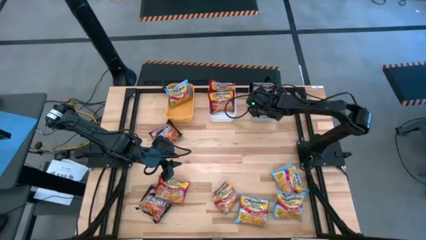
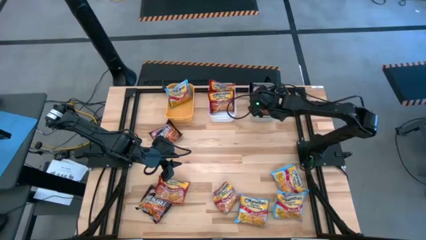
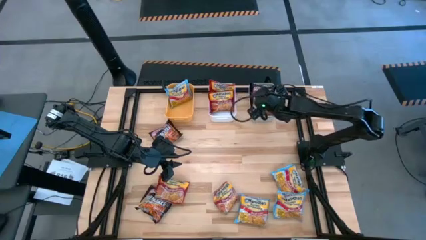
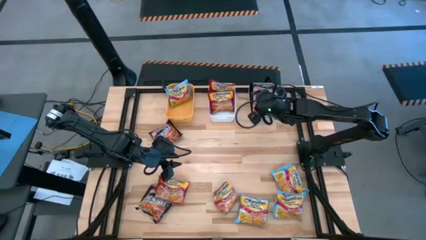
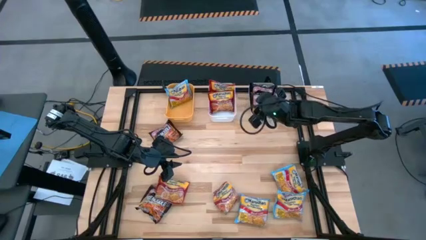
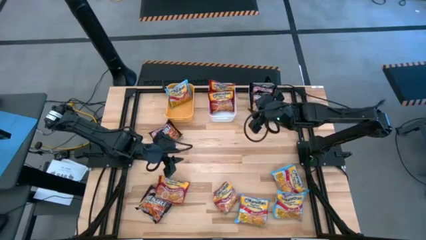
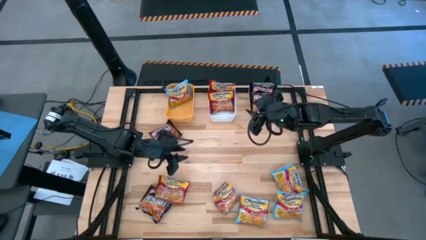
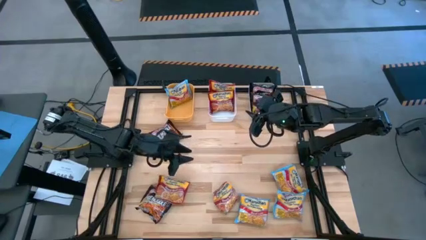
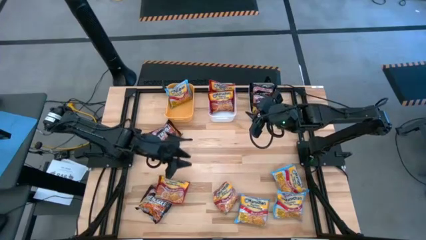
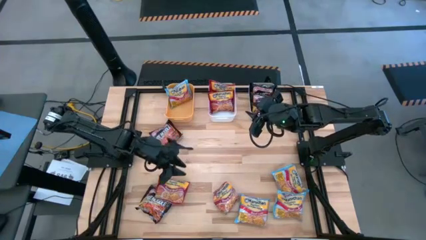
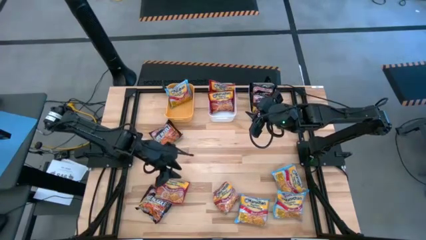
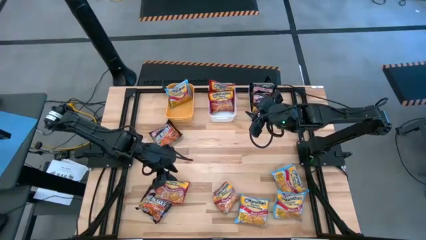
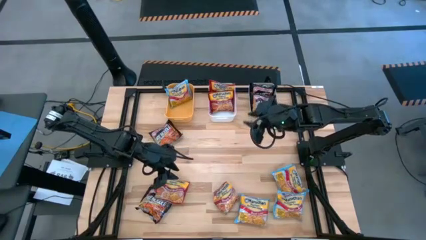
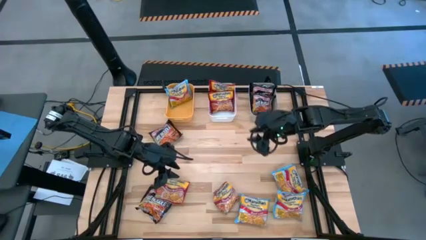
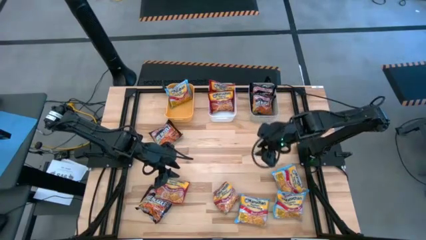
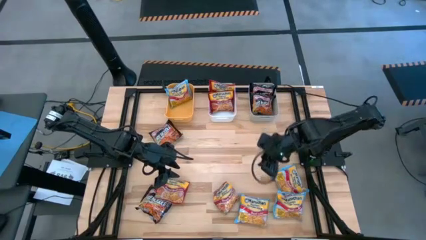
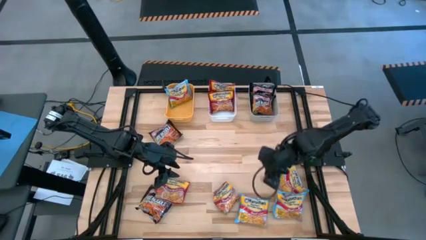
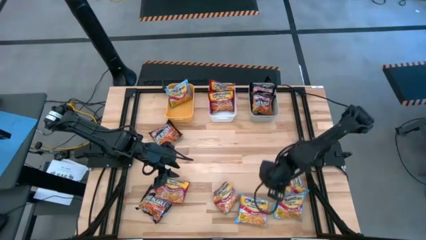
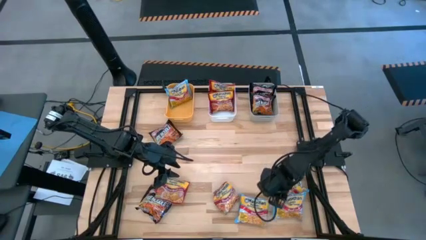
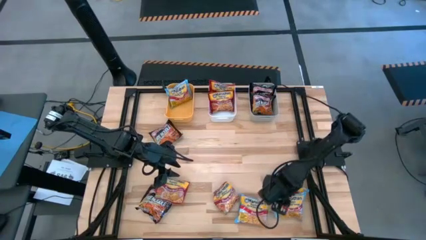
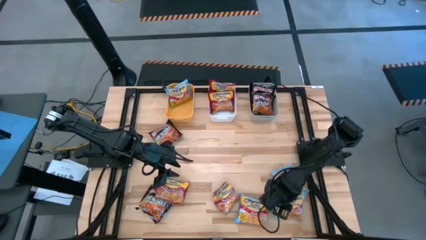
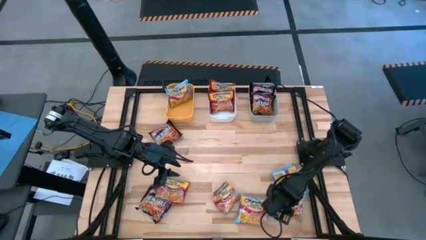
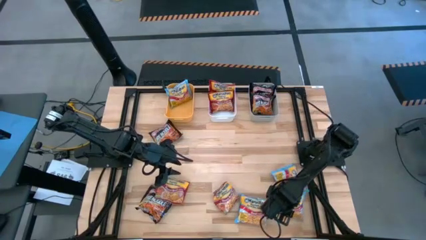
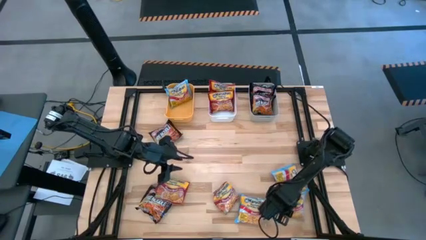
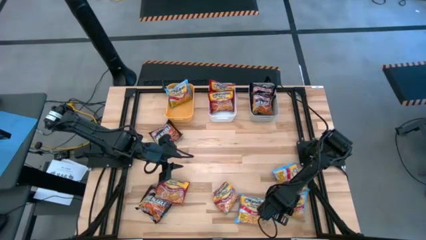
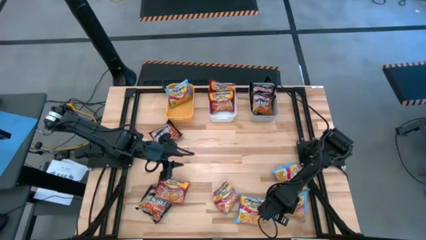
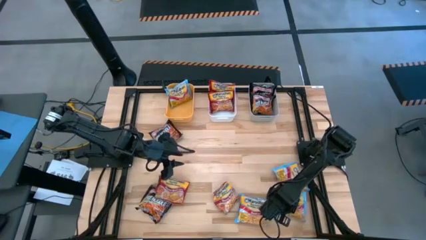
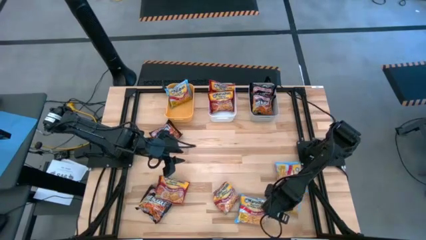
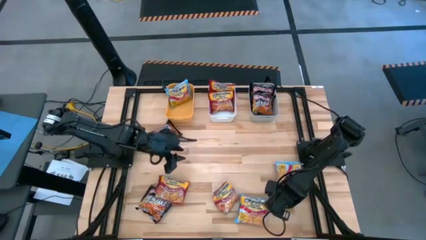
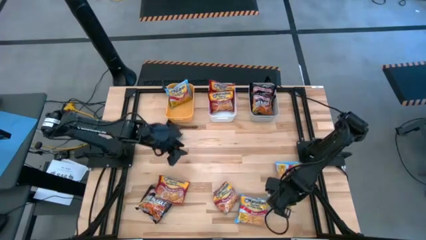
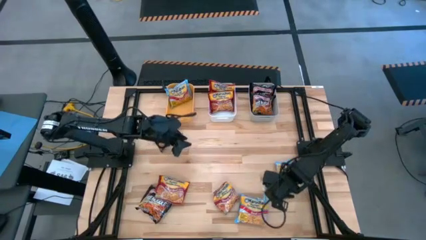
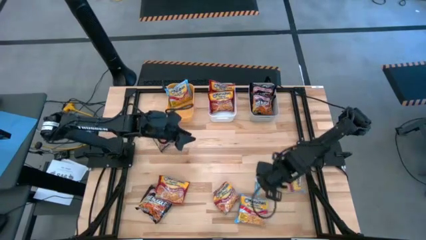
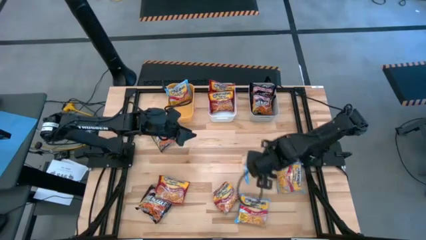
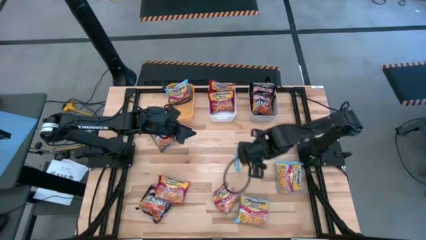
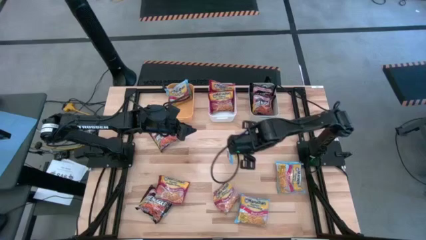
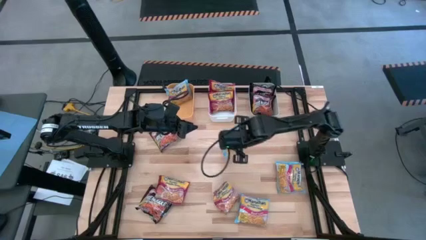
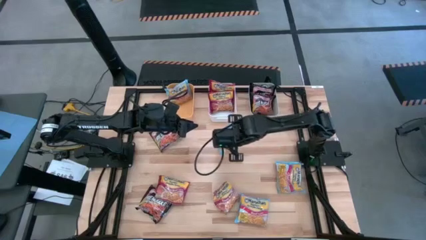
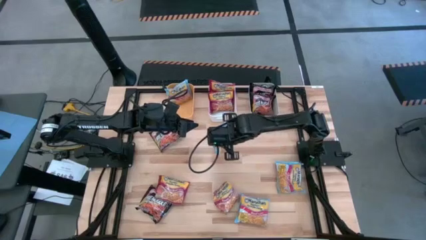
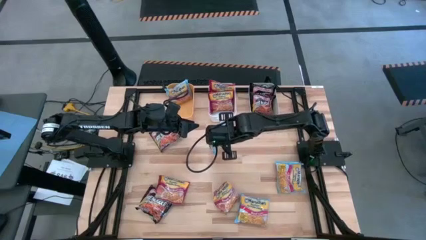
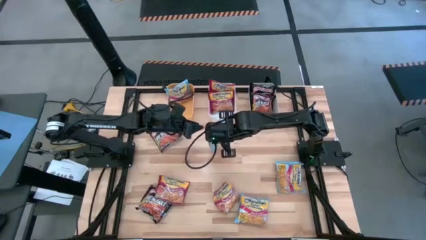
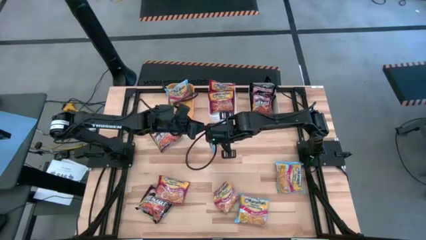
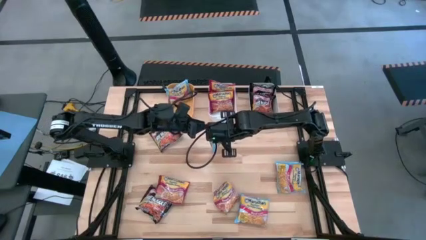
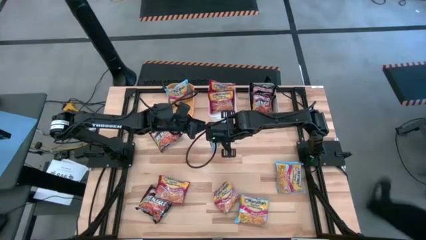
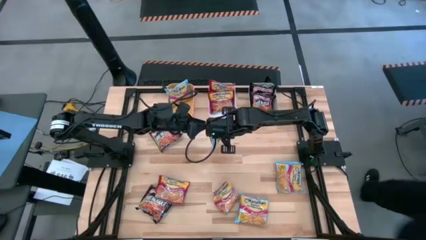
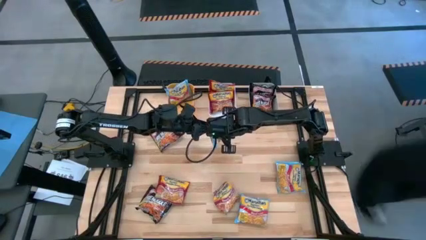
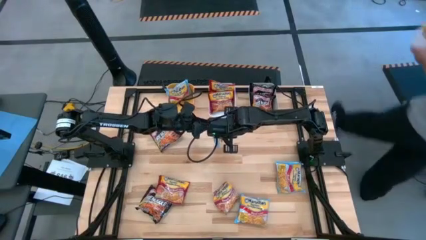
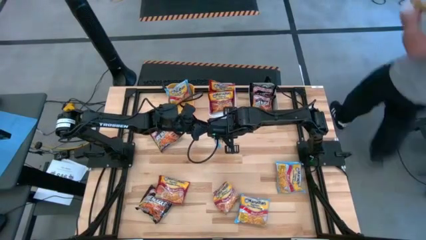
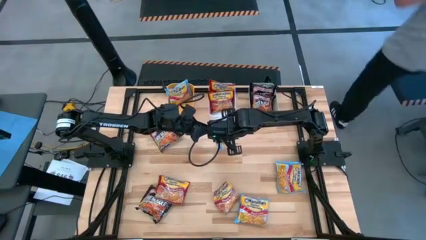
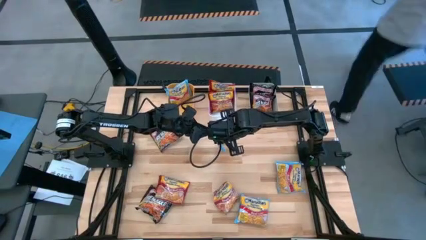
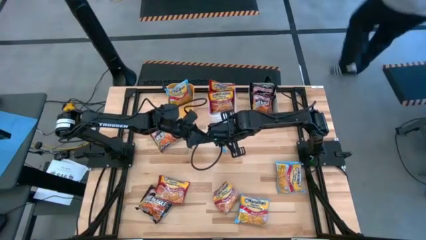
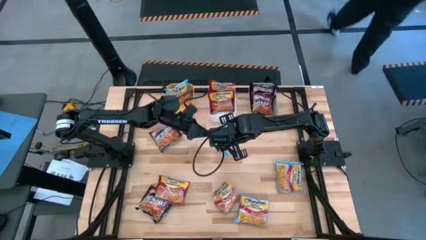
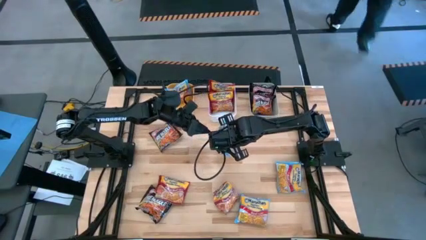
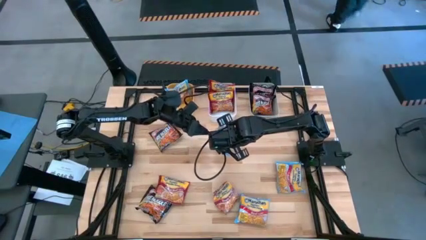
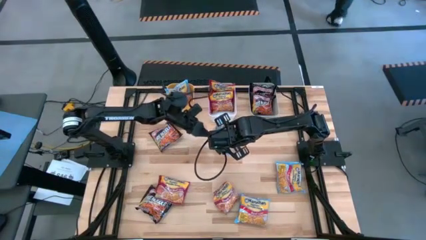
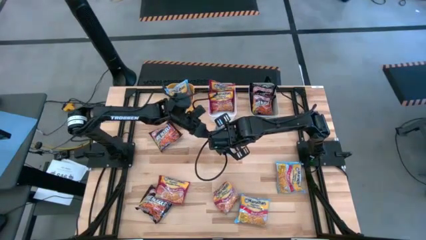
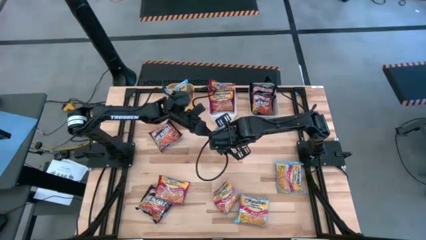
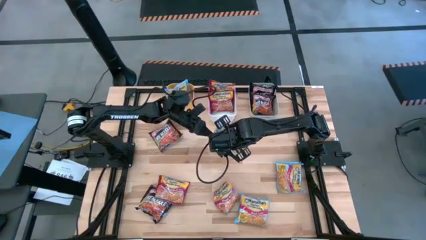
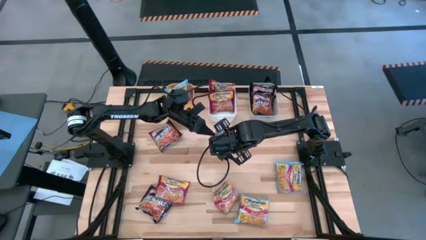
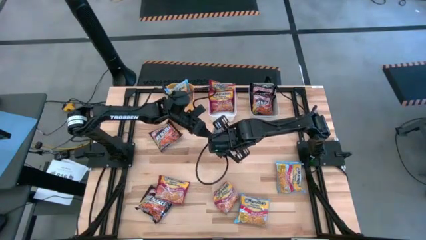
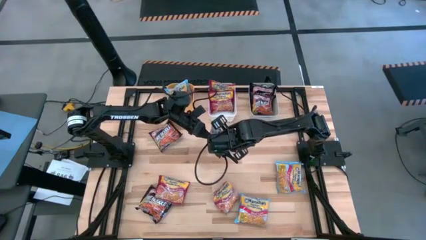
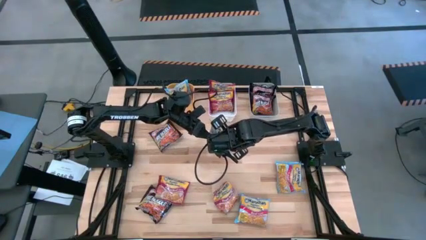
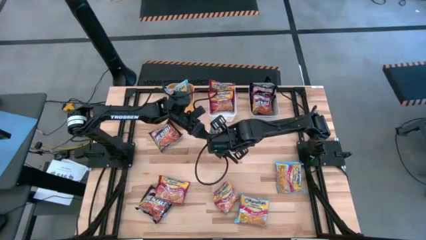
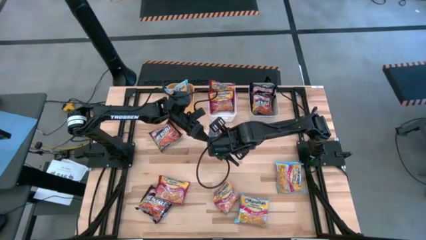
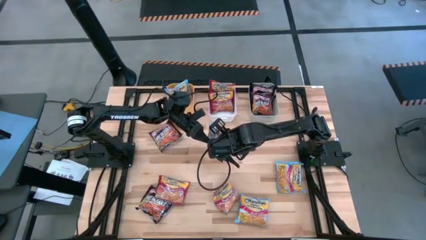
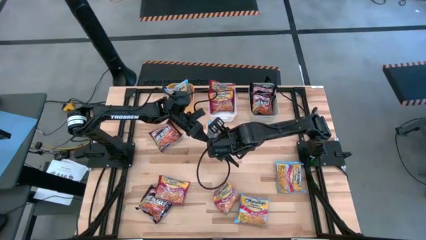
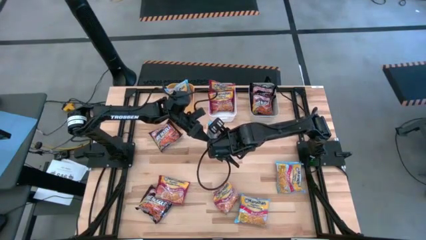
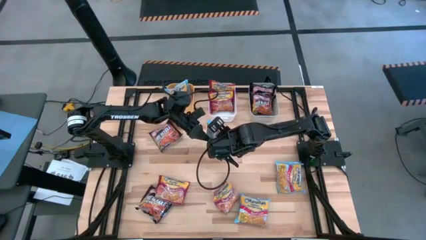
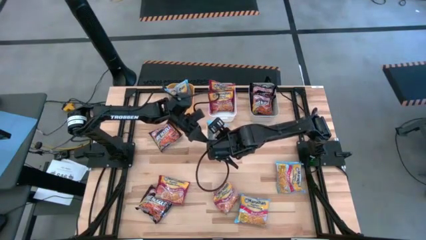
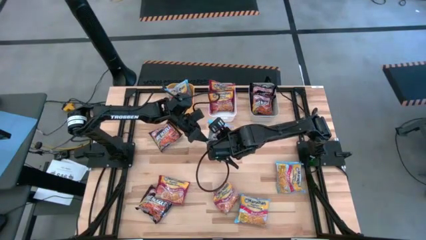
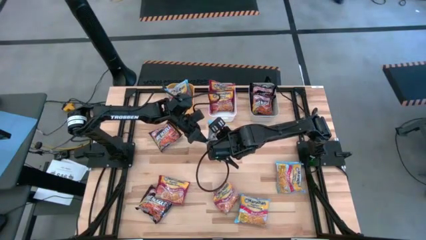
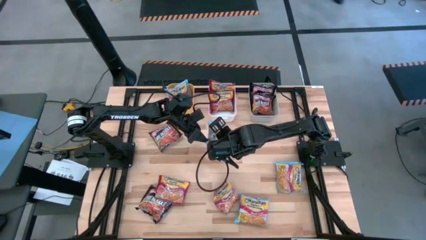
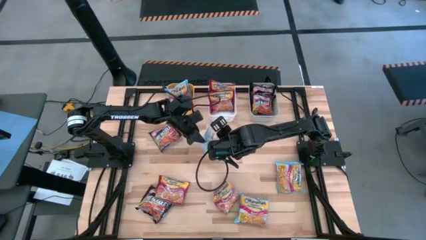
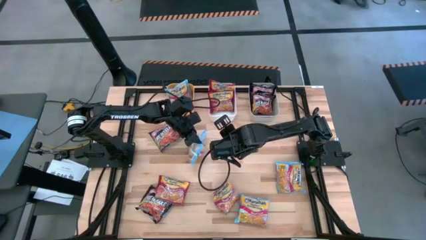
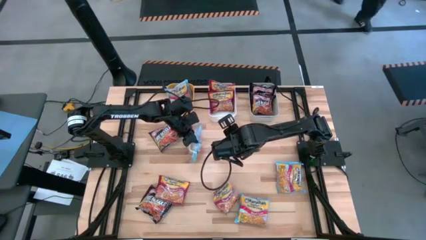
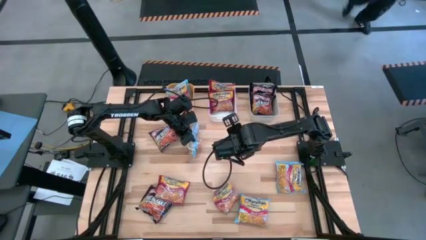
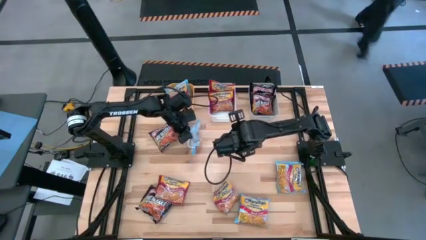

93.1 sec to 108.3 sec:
Task: Sort Maruchan noodles
Put the blue noodle pack into the orange bin
